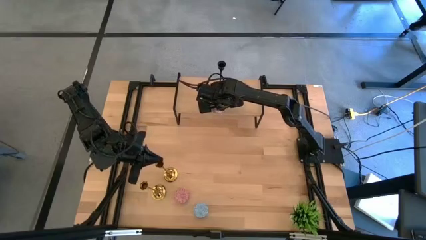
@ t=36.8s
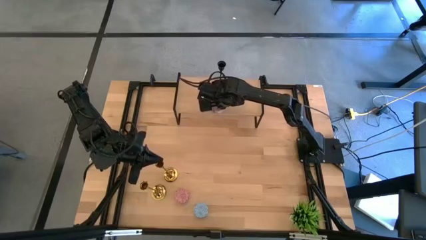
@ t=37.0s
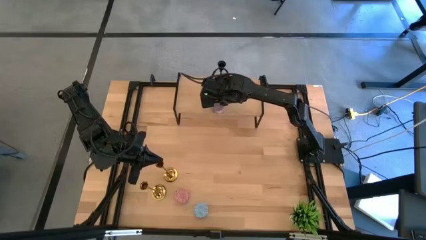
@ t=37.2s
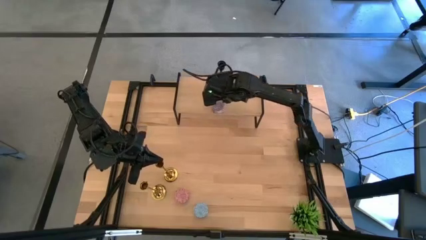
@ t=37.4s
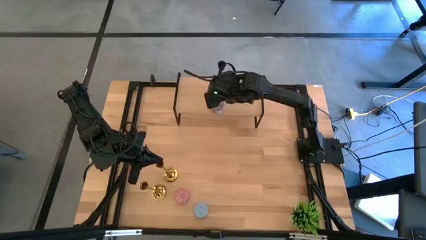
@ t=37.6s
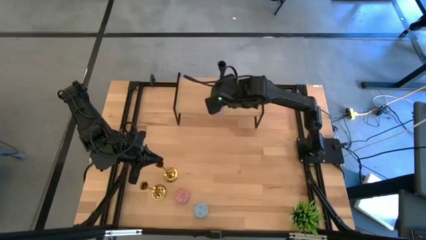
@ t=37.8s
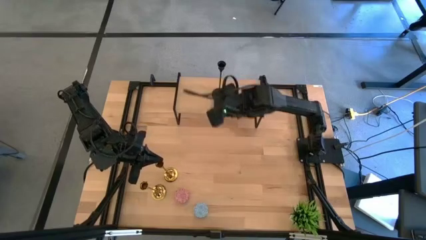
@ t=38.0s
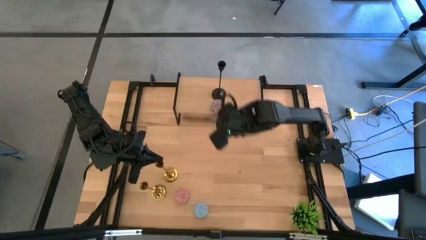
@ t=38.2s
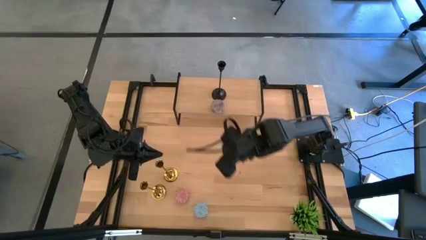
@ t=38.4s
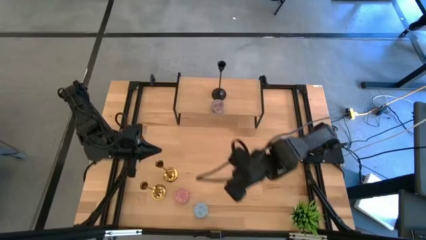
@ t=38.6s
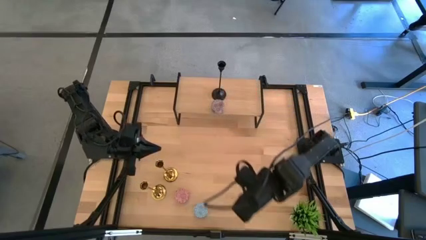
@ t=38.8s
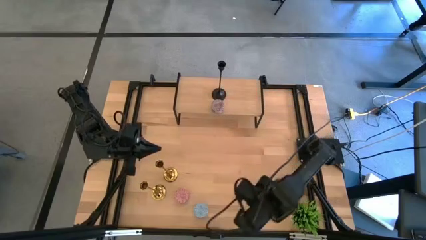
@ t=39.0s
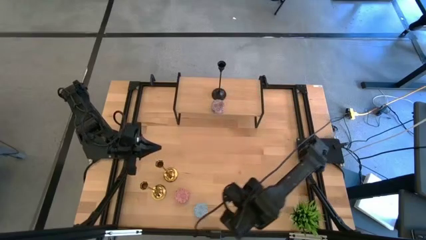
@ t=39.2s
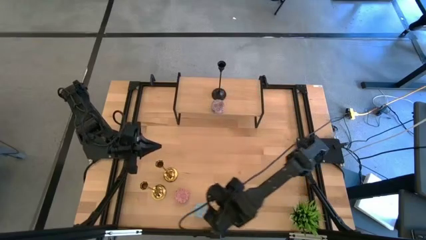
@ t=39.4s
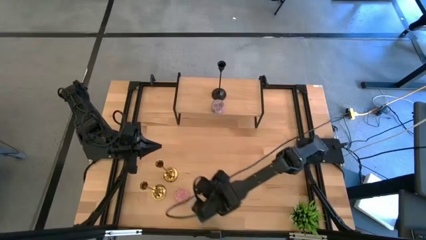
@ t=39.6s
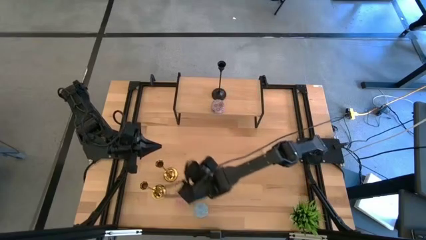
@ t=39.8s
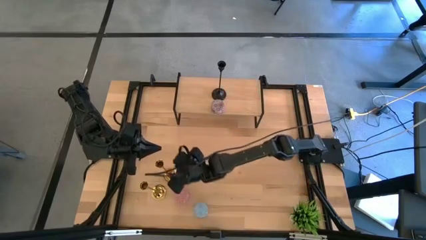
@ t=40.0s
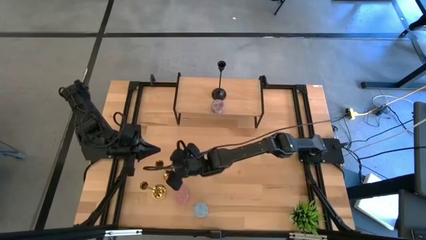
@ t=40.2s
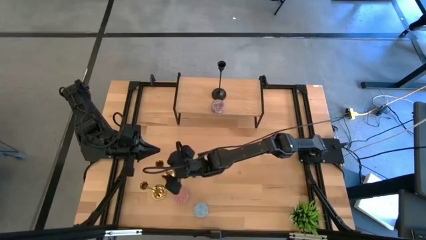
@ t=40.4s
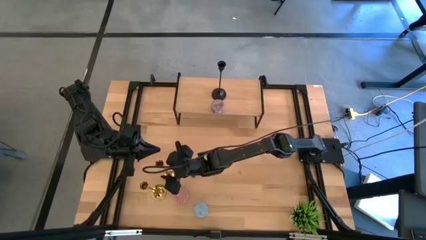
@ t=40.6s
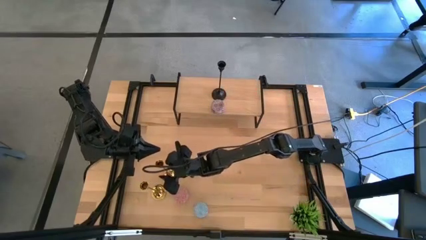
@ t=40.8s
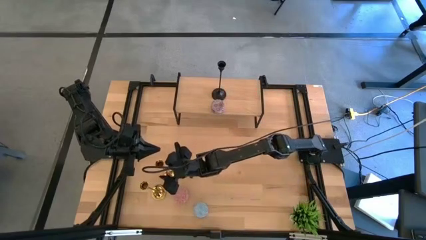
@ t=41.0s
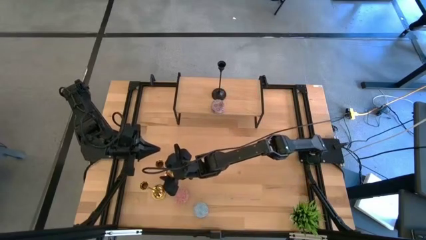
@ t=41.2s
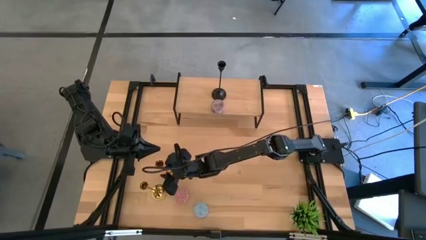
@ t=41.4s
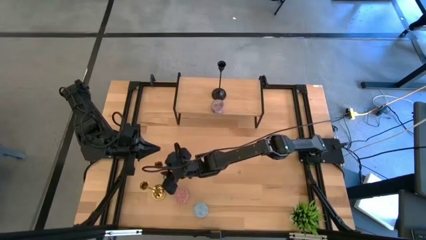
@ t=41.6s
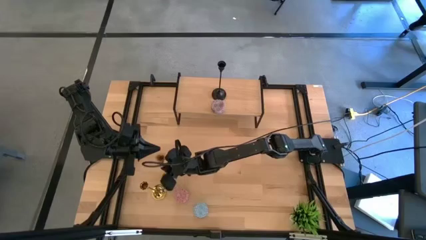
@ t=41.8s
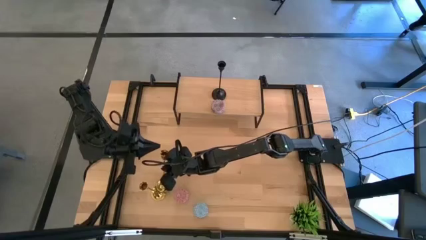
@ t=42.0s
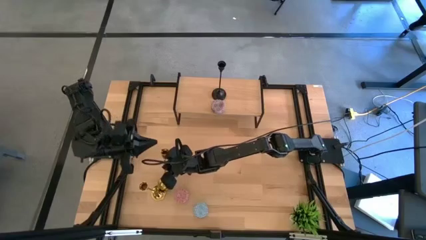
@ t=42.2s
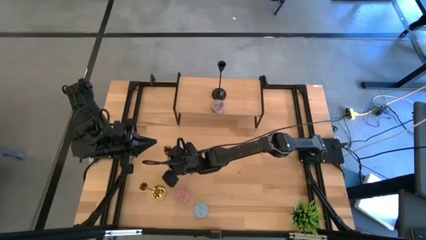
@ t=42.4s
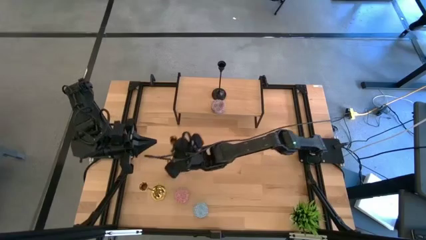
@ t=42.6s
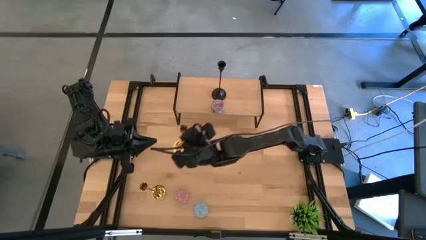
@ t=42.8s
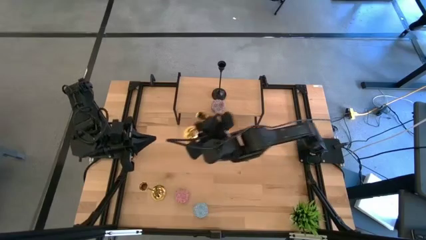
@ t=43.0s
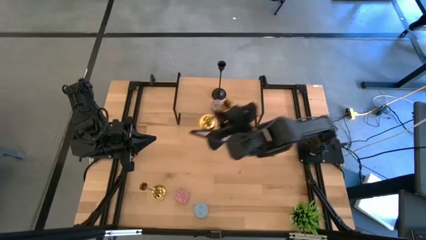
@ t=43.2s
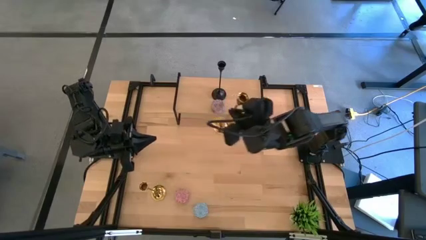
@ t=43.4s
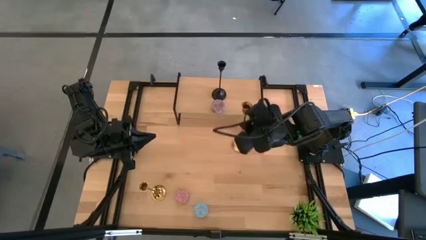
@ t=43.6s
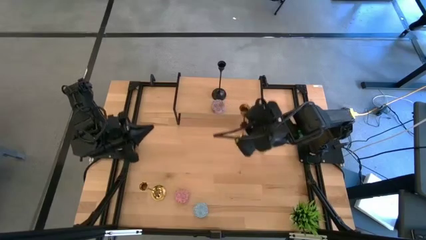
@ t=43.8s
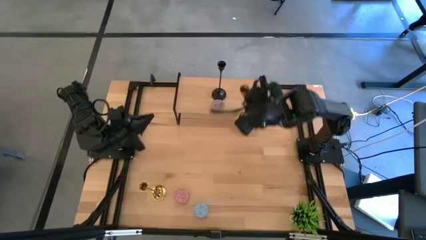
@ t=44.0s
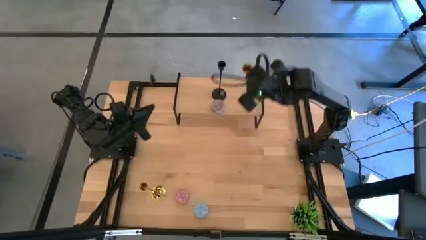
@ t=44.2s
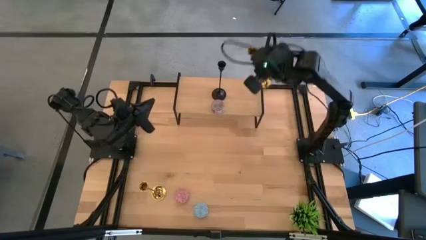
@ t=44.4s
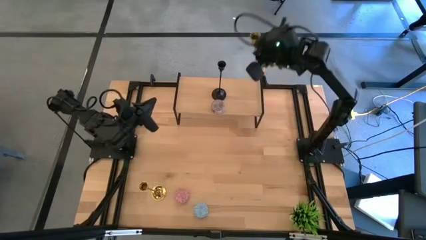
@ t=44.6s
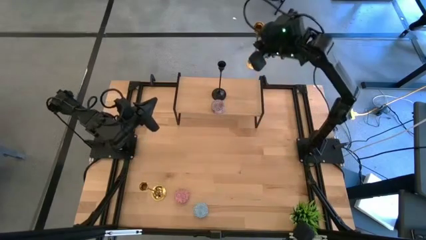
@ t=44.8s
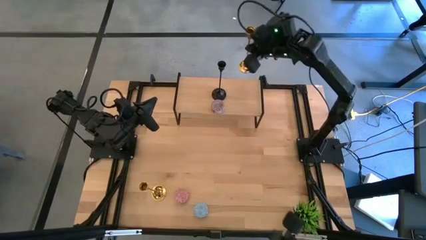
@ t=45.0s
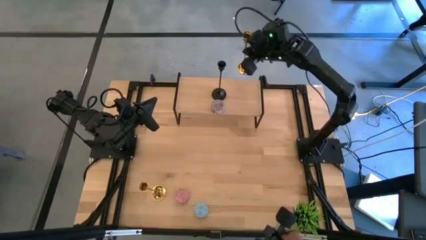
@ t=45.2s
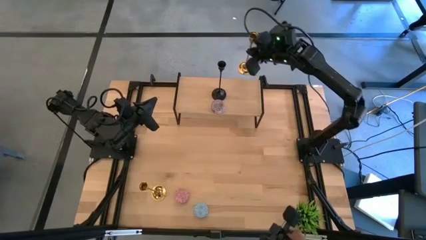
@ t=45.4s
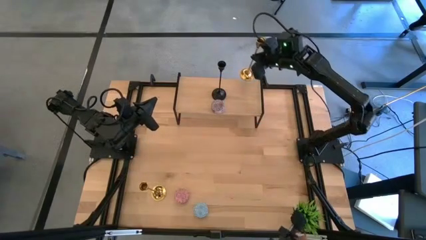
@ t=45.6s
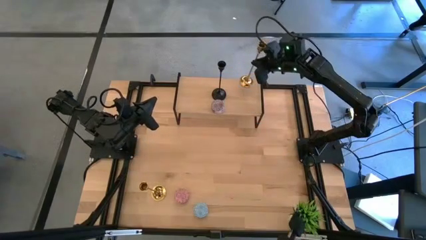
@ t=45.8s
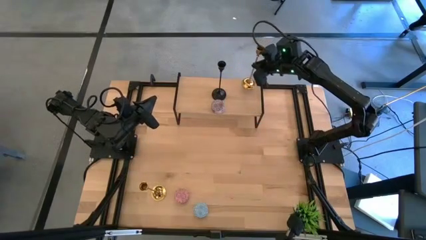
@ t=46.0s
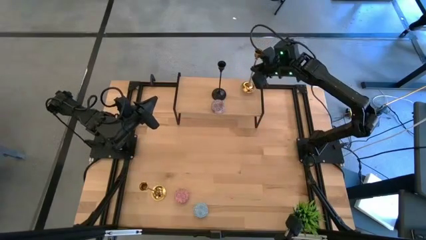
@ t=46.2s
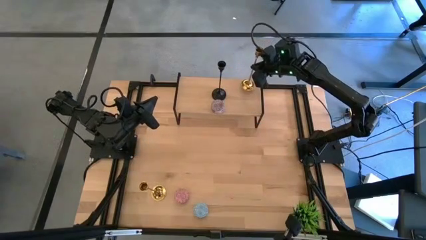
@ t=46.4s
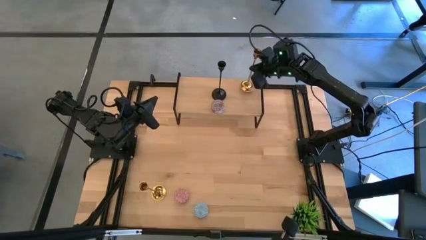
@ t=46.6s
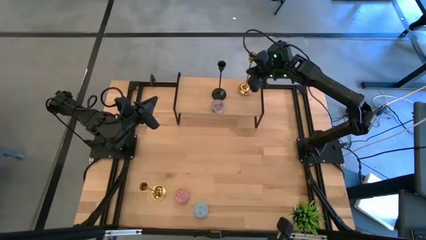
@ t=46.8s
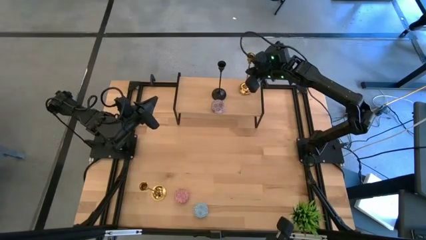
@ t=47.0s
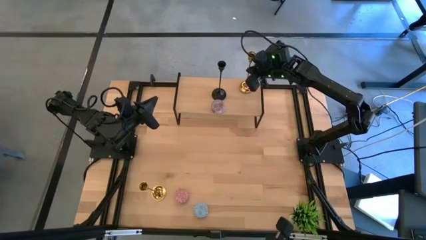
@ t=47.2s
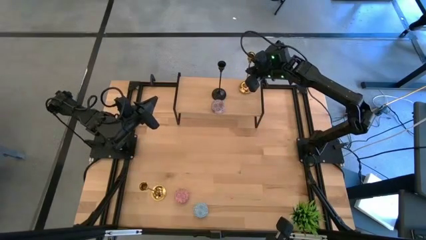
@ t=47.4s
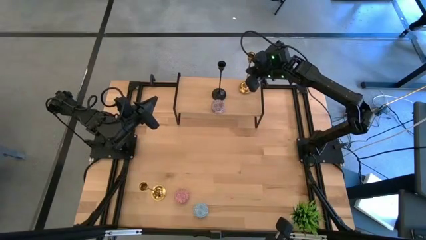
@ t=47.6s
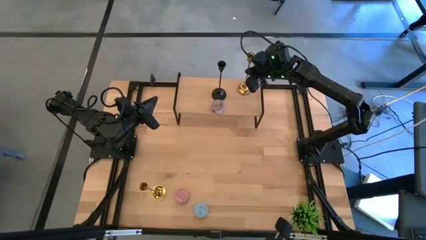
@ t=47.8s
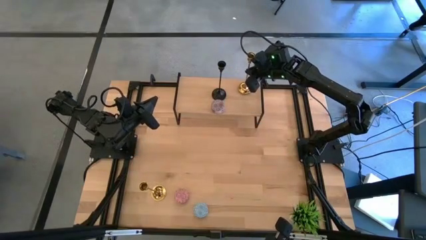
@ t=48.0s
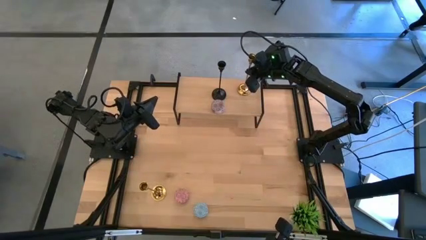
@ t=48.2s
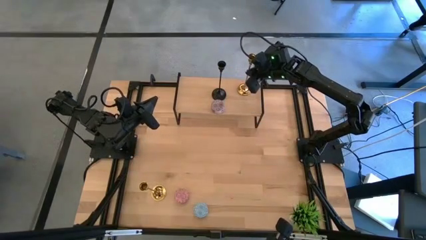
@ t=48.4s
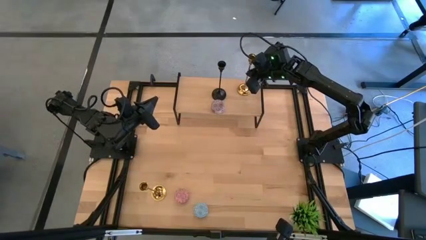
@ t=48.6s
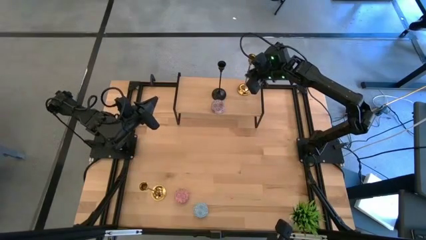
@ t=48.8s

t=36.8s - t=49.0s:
Task: Pick & Place candle stick holders
Put the gold candle holder on the shelf
